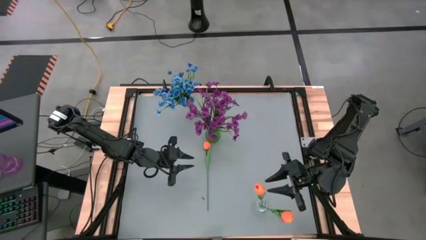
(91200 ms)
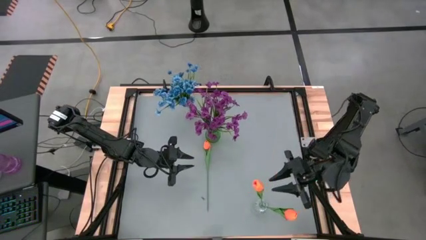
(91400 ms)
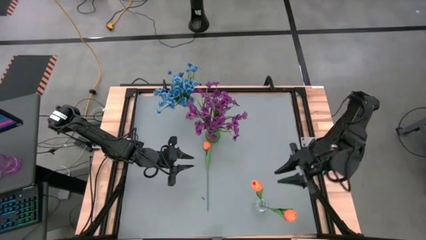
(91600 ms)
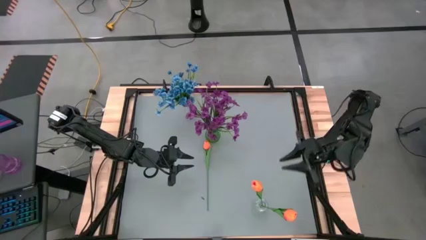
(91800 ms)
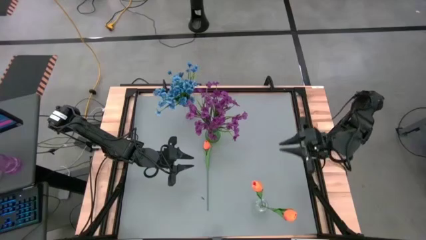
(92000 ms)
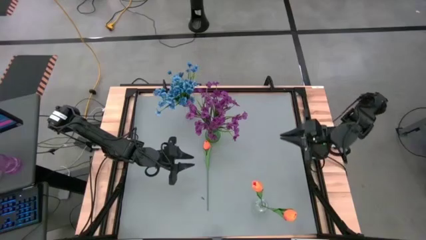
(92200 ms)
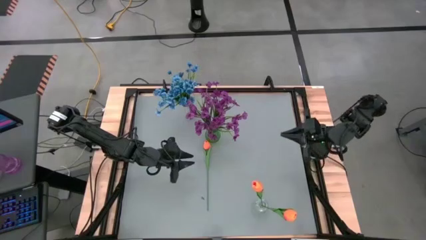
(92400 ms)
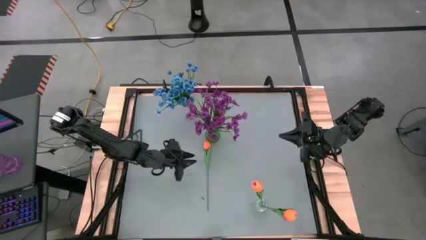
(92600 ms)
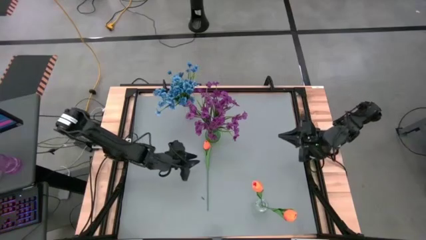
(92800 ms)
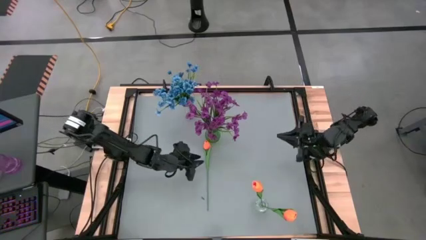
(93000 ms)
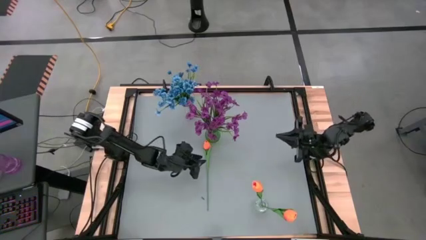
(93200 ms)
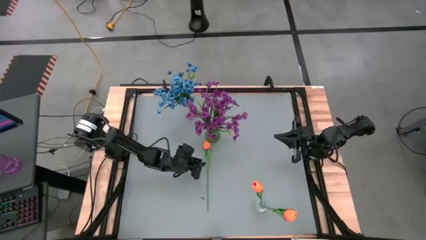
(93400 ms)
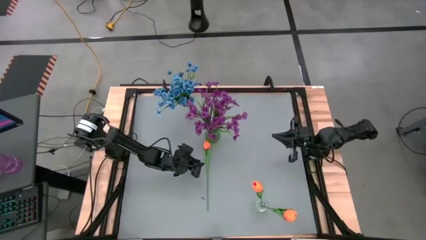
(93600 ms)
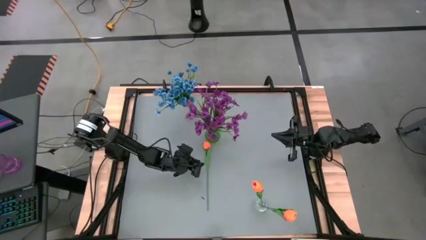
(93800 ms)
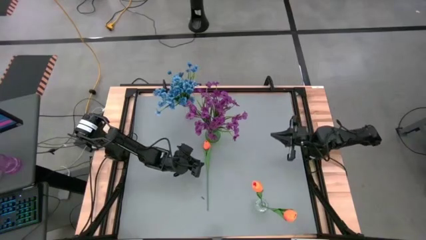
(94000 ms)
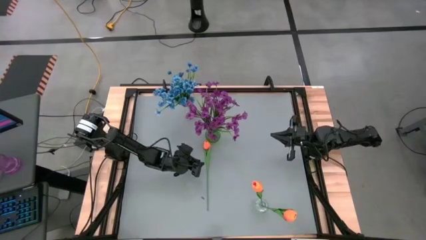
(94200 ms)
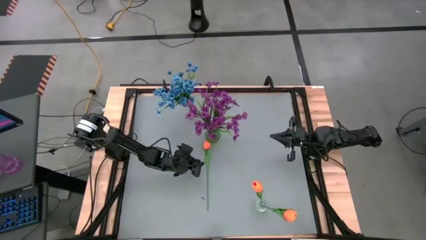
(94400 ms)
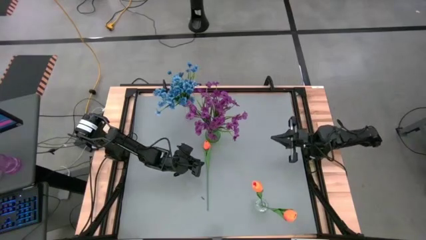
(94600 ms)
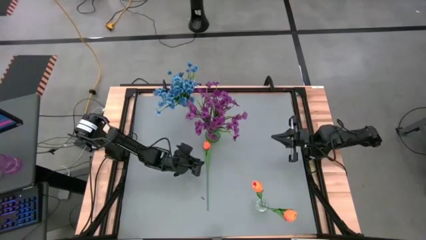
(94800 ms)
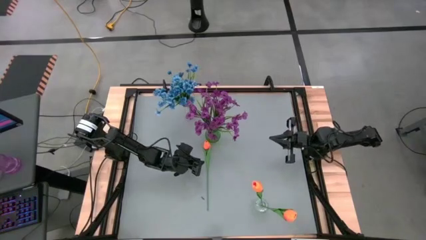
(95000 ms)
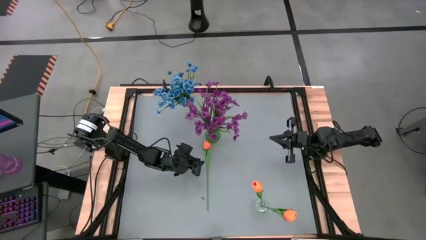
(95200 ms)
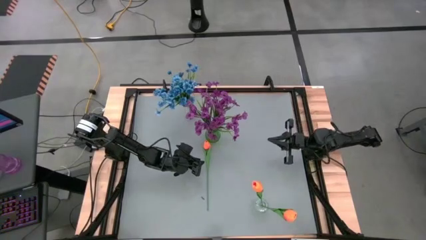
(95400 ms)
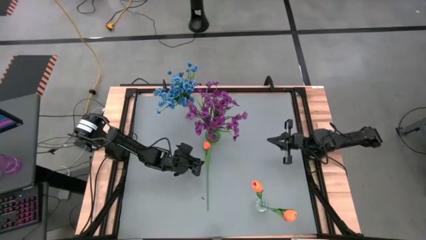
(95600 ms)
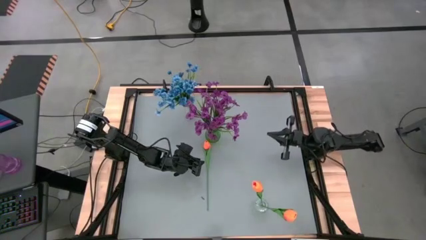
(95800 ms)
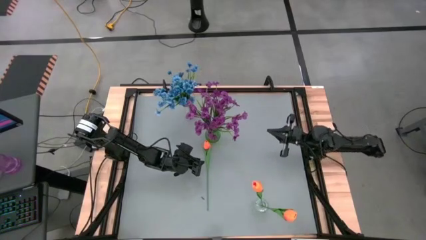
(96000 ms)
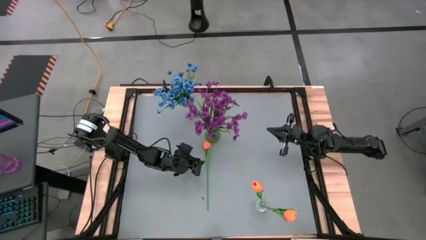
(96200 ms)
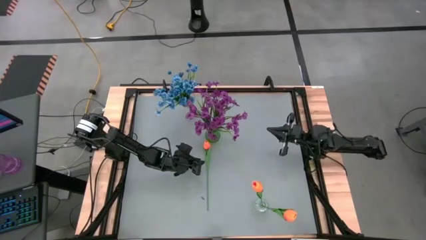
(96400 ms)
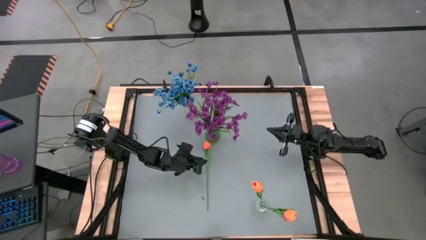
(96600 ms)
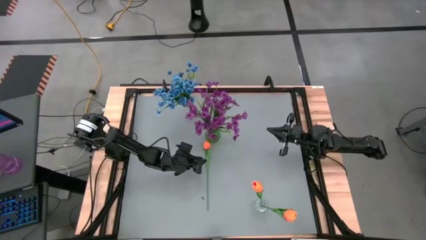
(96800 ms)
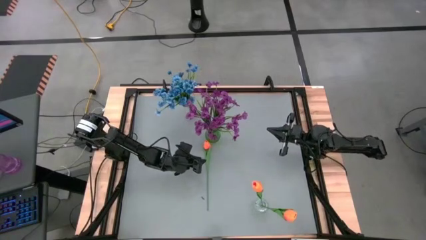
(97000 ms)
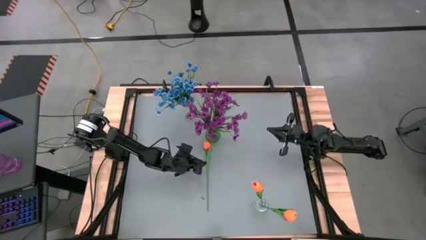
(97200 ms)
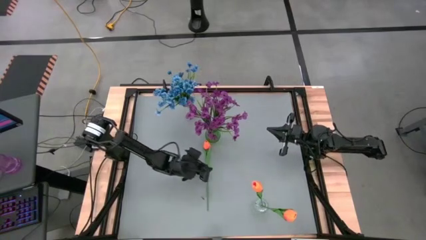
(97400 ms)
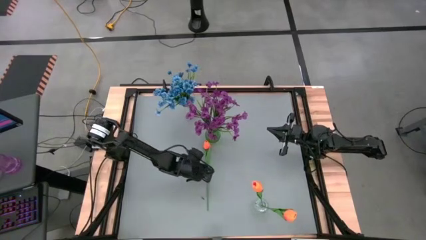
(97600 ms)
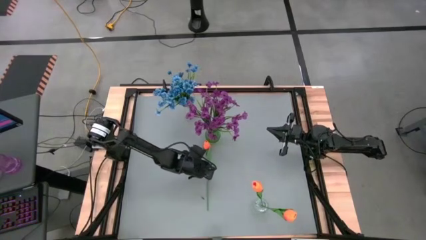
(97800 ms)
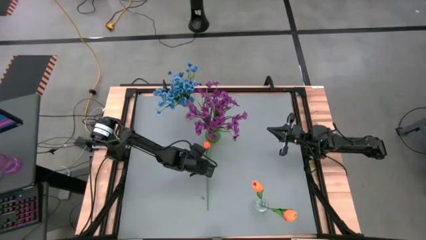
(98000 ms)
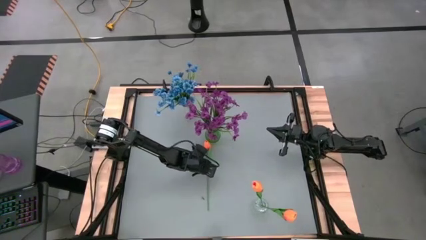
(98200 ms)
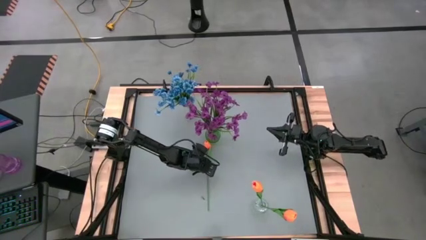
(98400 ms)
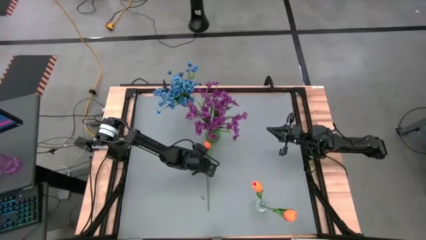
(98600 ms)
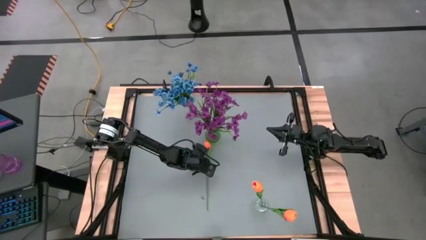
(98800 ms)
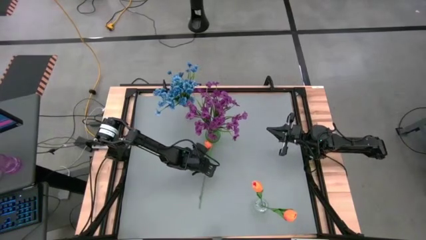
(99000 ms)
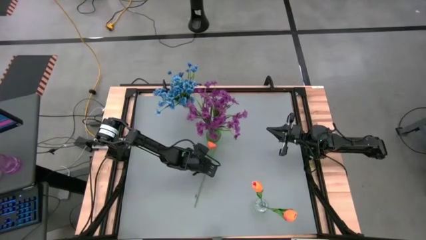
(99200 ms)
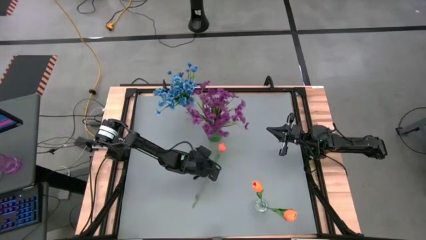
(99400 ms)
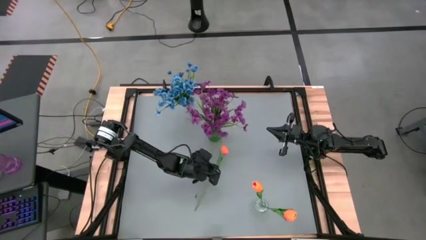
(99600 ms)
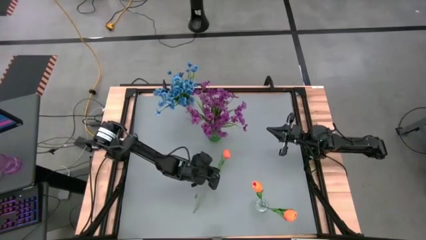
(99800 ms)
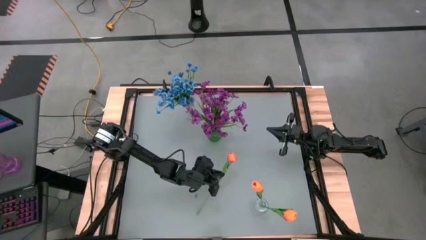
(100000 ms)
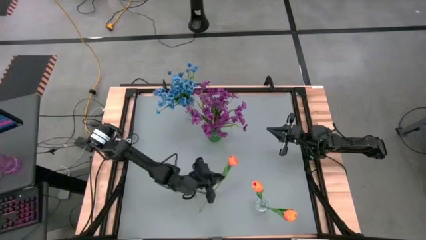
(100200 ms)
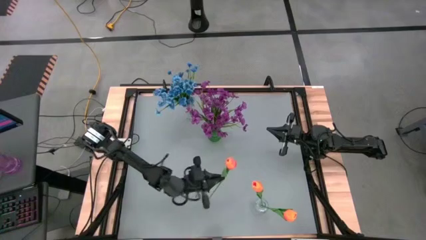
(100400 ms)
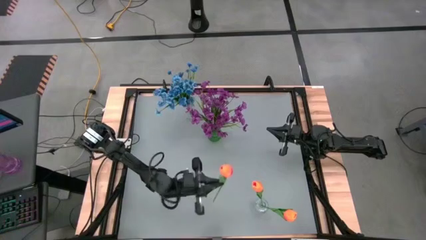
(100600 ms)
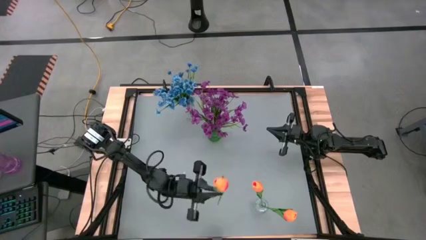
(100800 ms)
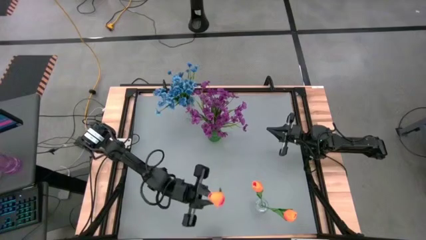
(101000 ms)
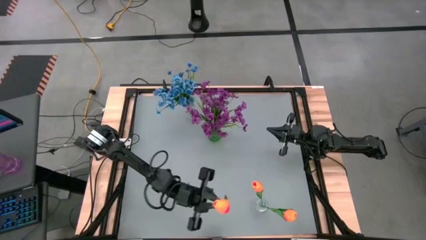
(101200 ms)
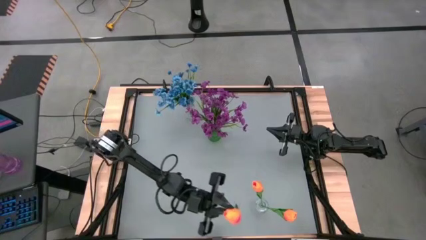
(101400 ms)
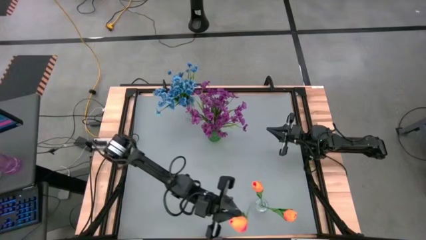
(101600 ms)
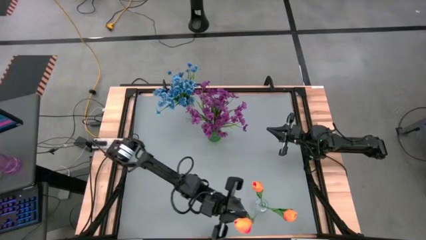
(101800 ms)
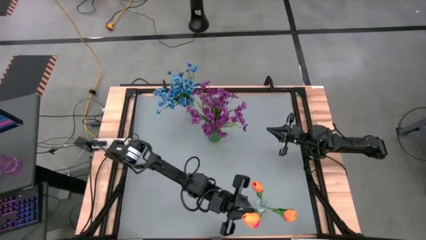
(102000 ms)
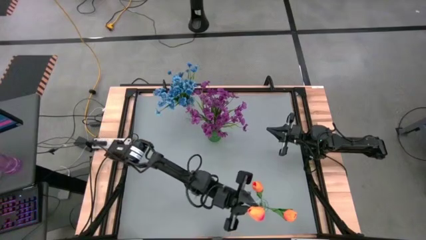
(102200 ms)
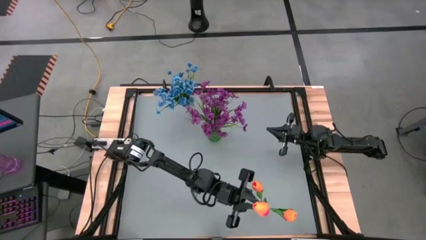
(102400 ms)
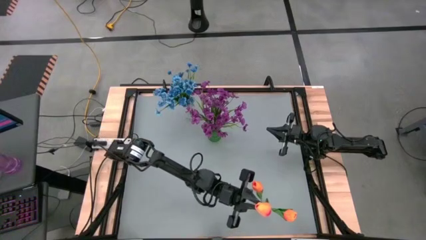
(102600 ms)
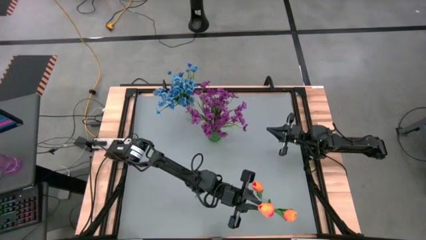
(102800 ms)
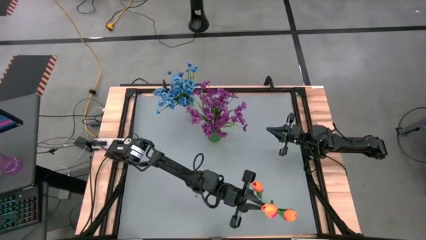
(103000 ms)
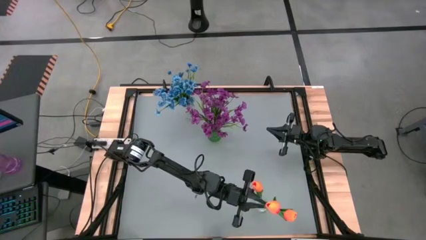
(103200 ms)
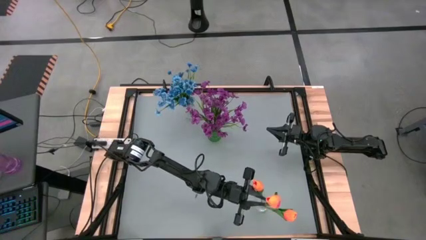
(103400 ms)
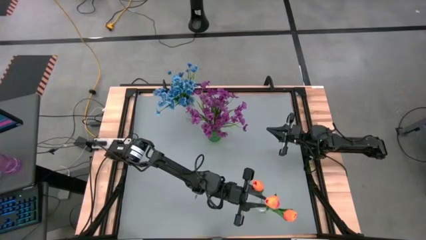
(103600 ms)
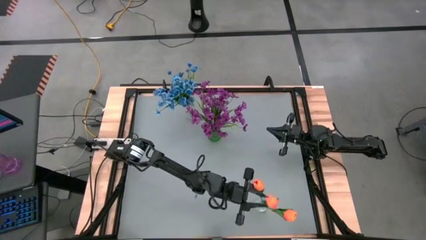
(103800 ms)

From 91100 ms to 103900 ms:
Task: Sort flowers into vase by color
Put the orange flower into the bottom transparent vase

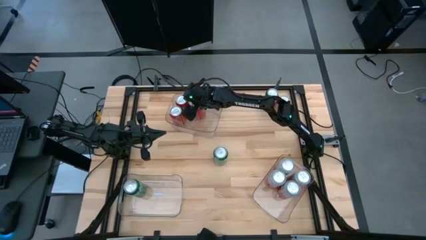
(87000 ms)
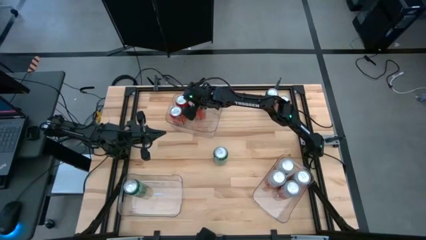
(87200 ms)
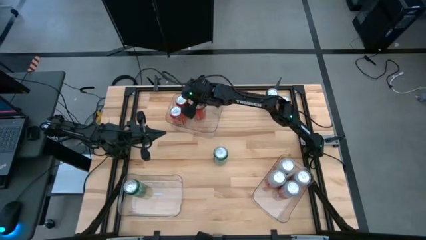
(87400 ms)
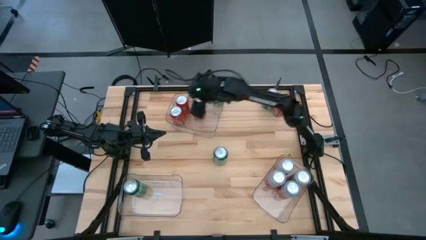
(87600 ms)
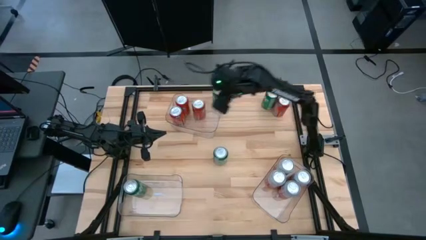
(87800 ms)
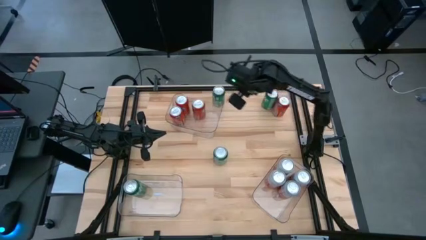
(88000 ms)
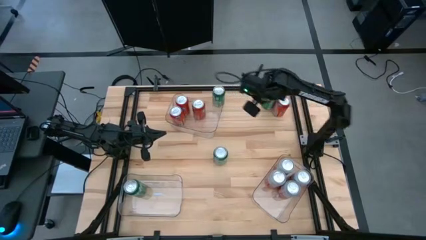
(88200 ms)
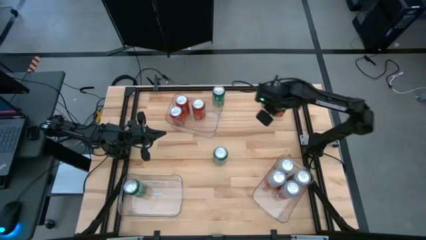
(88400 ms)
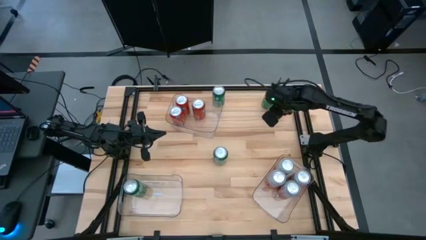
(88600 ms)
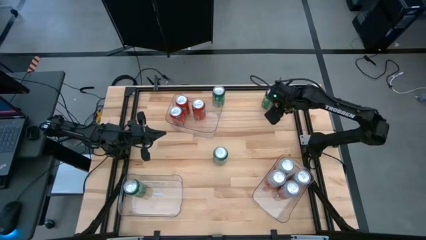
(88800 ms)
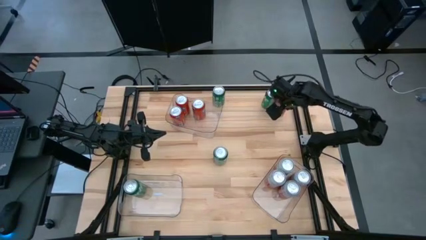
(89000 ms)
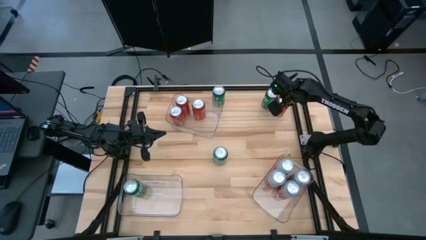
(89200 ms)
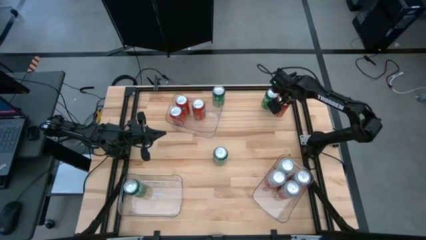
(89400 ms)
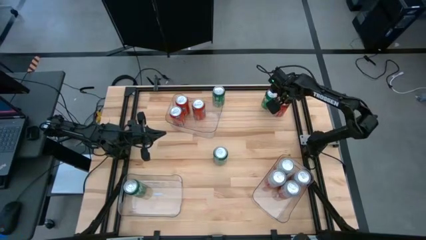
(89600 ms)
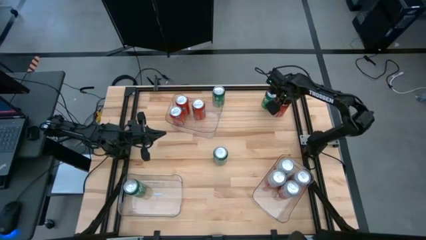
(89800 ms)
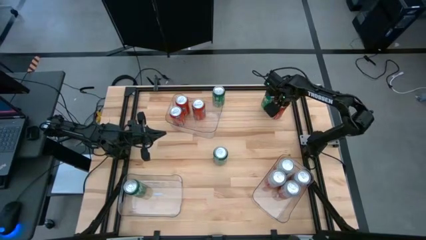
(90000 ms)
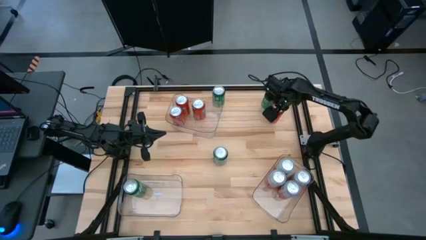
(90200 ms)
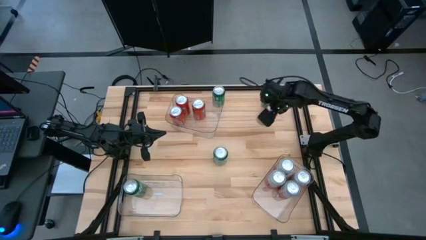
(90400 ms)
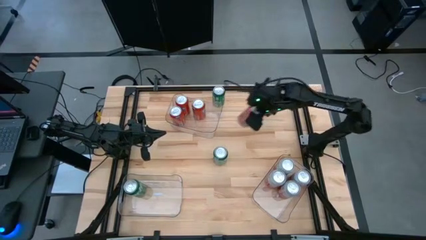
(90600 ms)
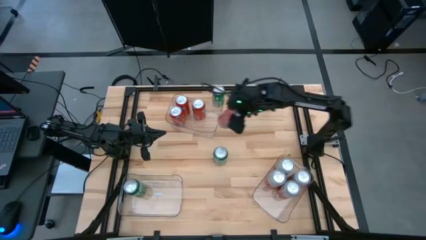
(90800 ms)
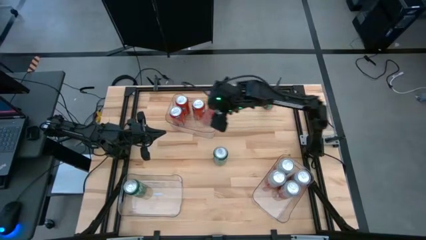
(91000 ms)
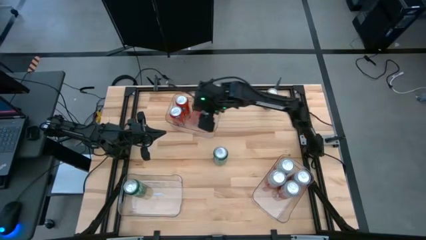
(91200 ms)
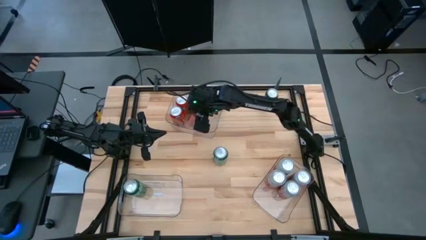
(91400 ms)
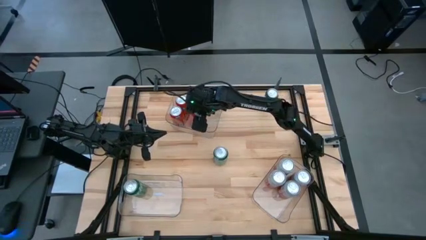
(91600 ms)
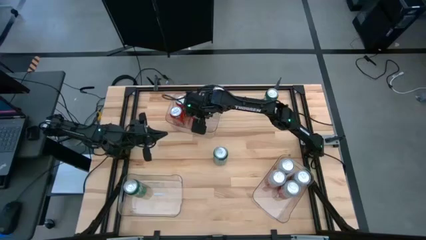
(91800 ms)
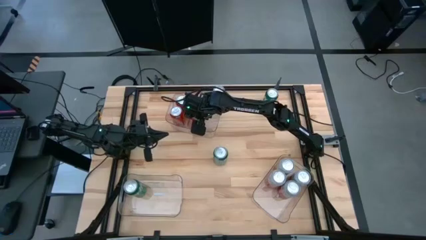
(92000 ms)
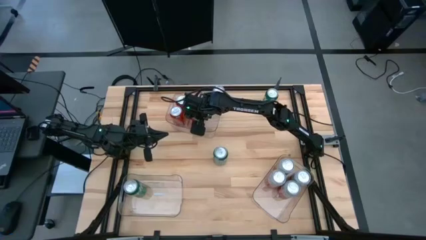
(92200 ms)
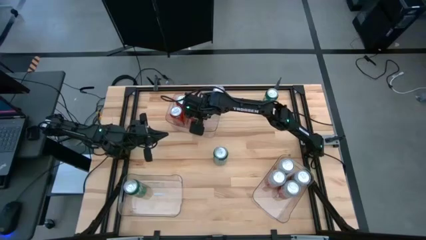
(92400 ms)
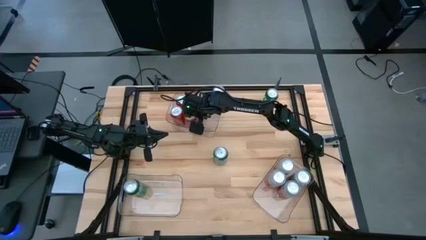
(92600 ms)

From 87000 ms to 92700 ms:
Task: Sort soda cans
Put the orange soda can into the top left transparent bin
